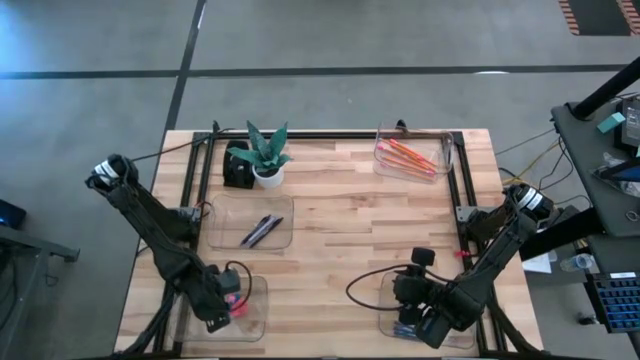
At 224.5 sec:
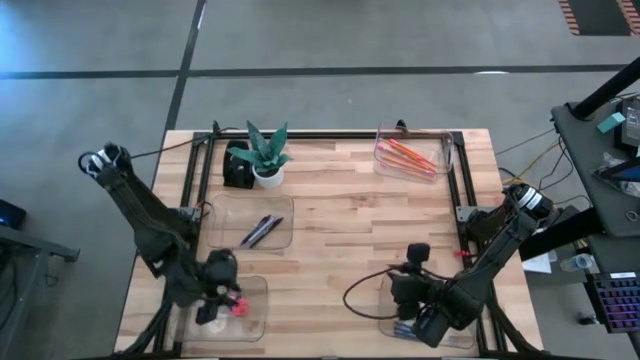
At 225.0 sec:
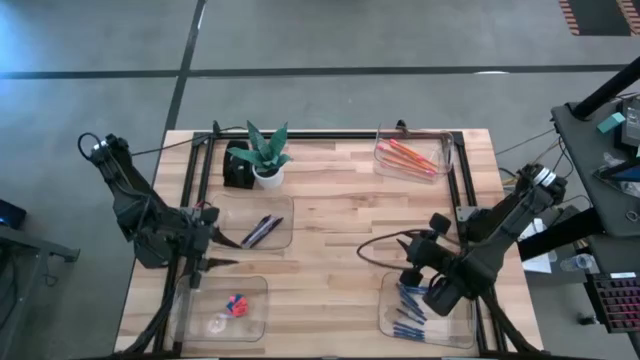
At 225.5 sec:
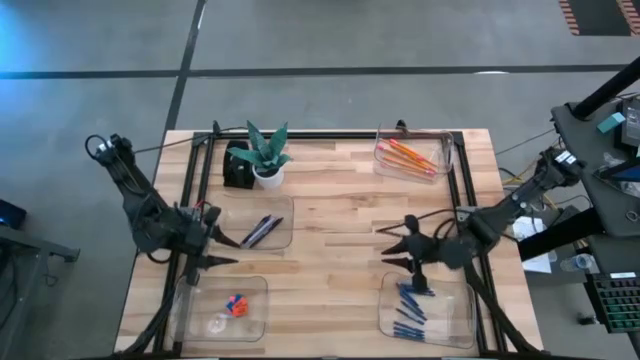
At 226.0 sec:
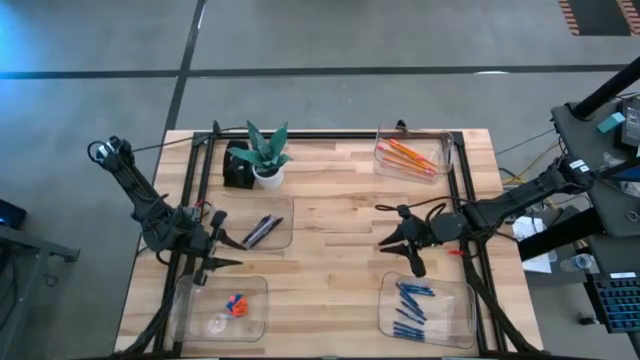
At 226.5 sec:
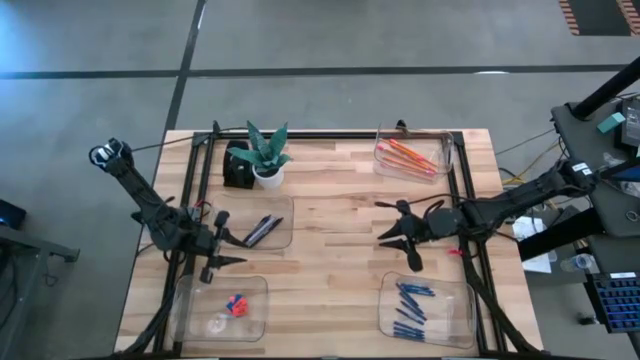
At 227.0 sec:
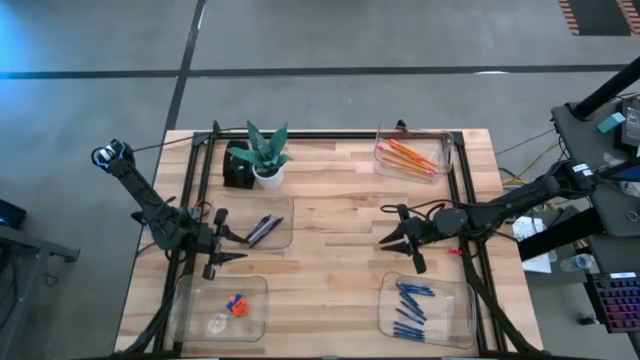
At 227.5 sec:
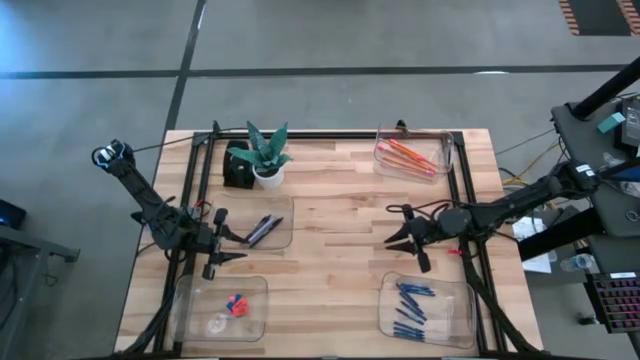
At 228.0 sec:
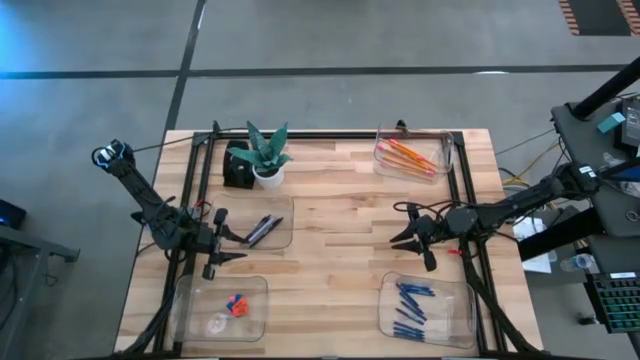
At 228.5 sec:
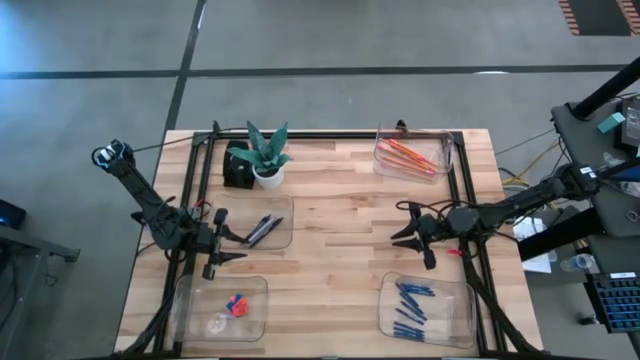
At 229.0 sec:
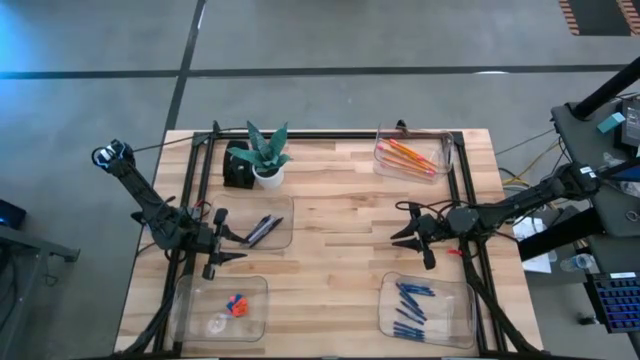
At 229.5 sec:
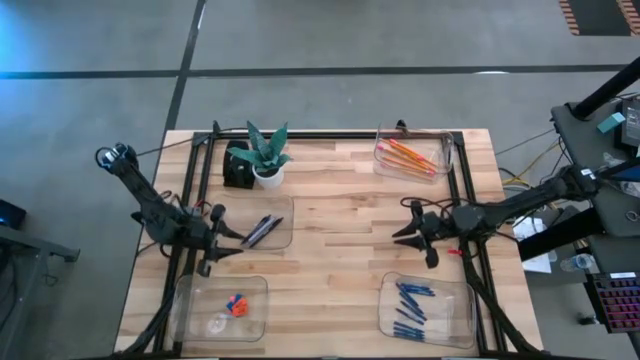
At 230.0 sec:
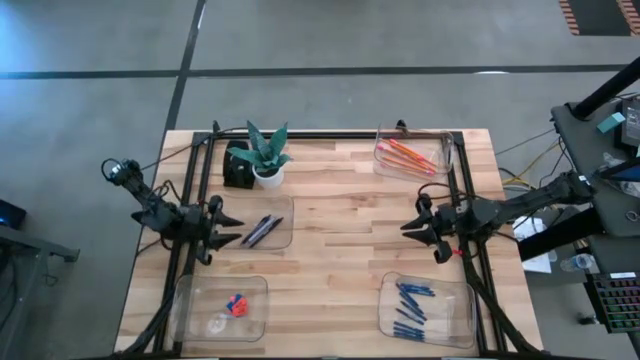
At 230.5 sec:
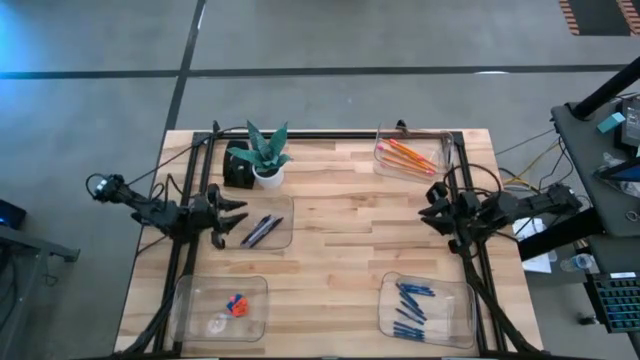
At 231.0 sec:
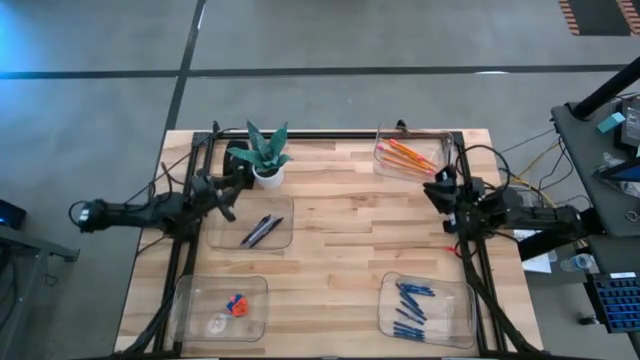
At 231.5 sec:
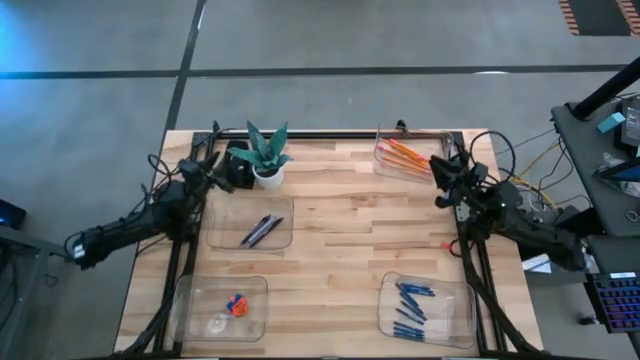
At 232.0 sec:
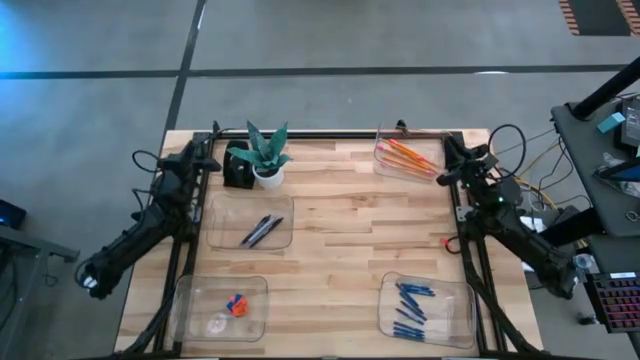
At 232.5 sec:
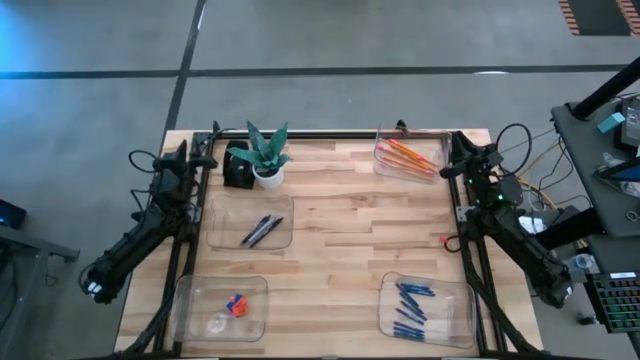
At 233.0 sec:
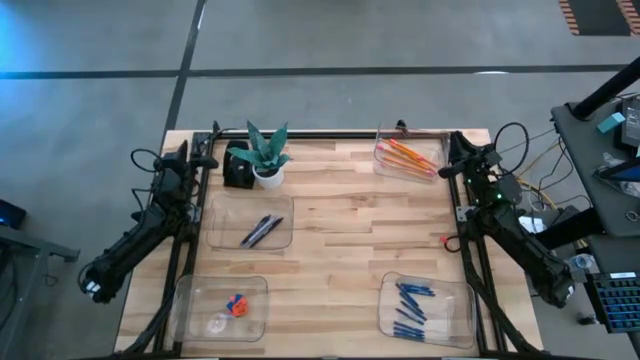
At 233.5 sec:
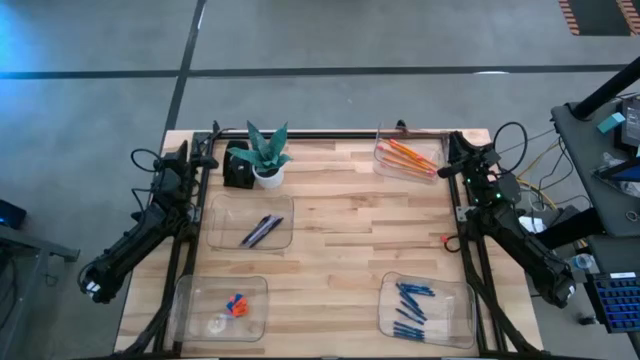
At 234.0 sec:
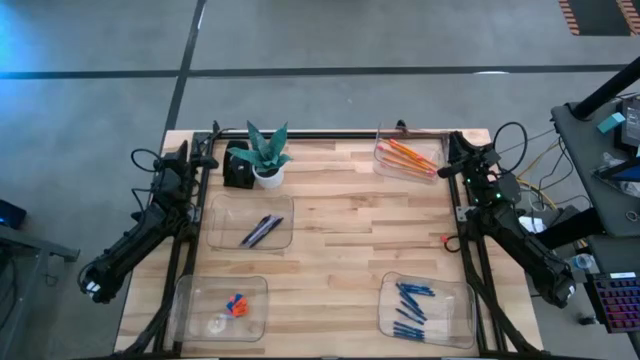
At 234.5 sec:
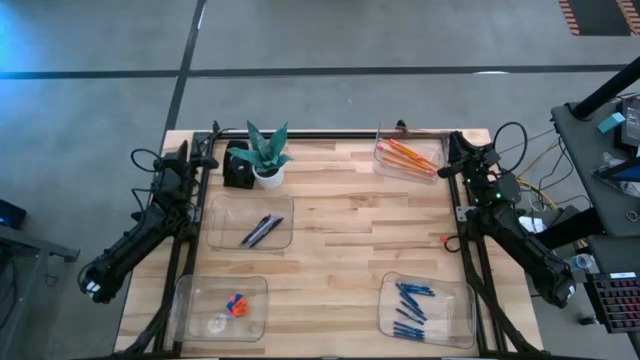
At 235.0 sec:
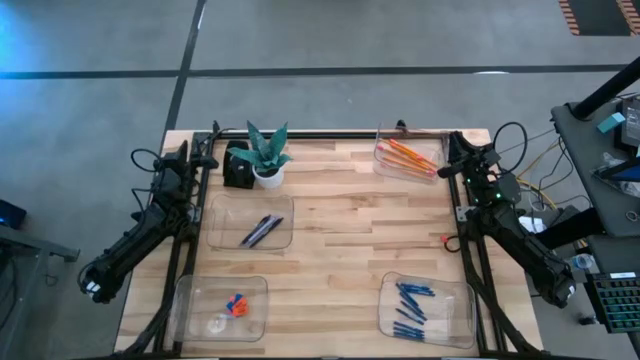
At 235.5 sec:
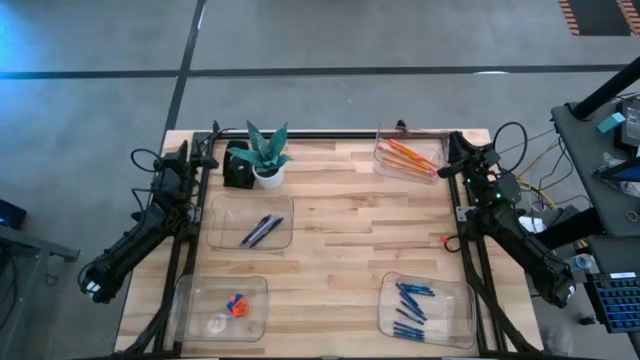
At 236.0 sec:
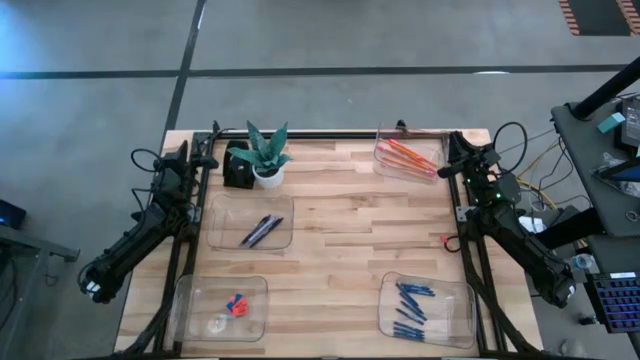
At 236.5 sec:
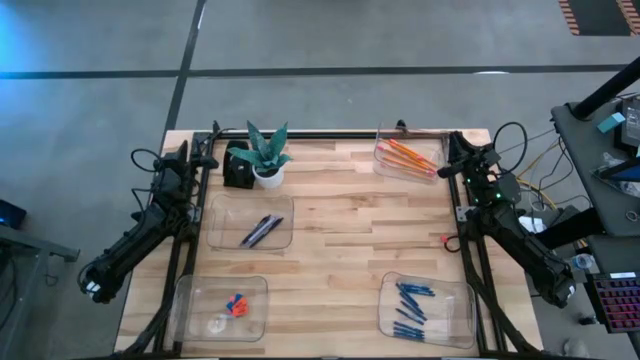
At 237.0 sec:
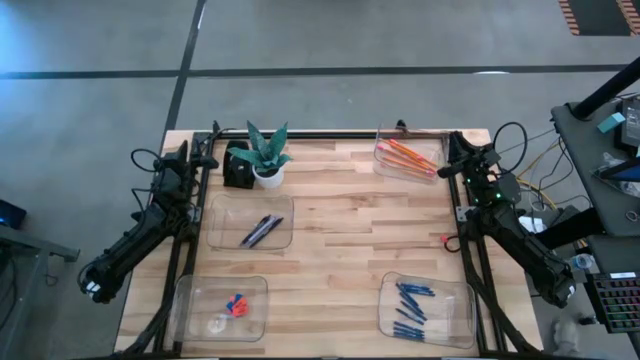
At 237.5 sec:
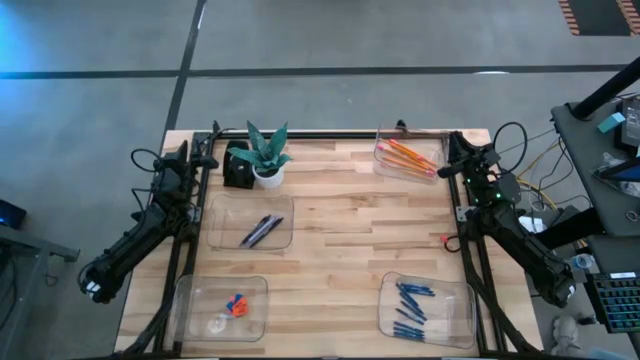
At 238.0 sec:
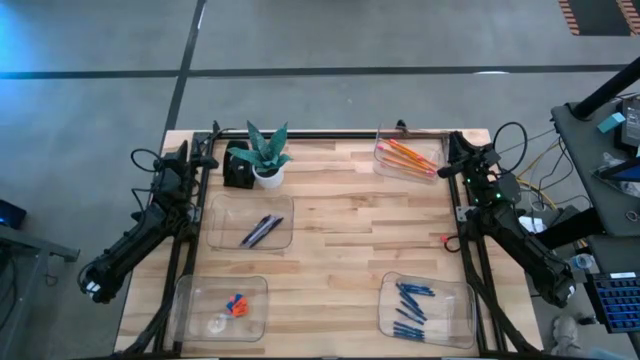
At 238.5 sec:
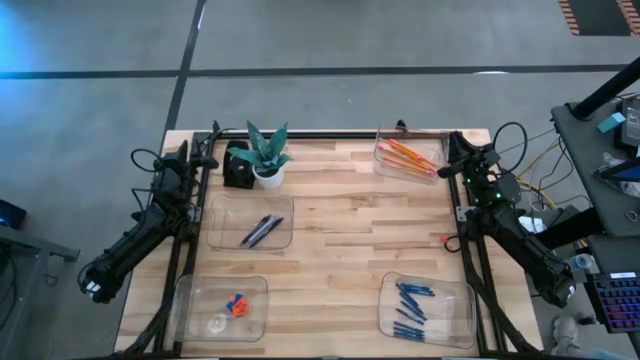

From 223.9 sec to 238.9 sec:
Task: Sort crayons/erasers/pens/pencils in bins
Return to Home Position

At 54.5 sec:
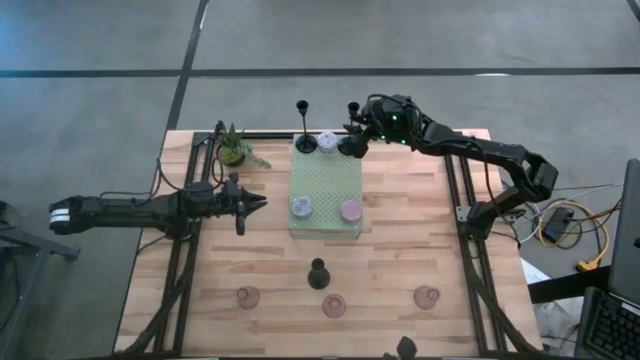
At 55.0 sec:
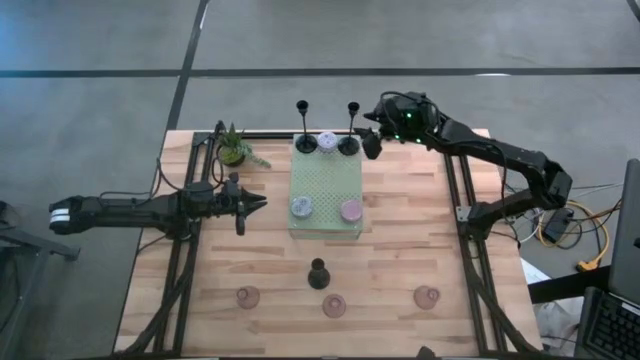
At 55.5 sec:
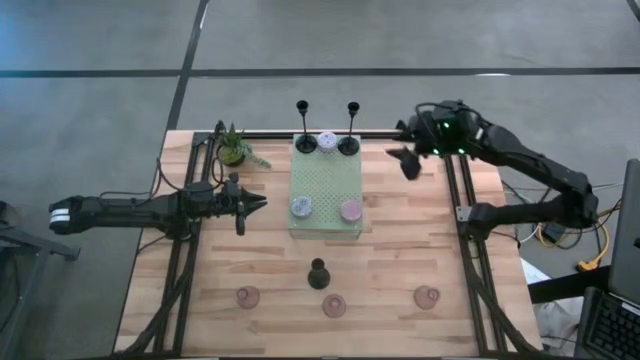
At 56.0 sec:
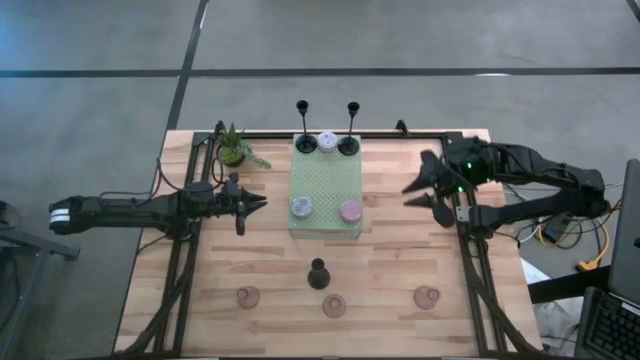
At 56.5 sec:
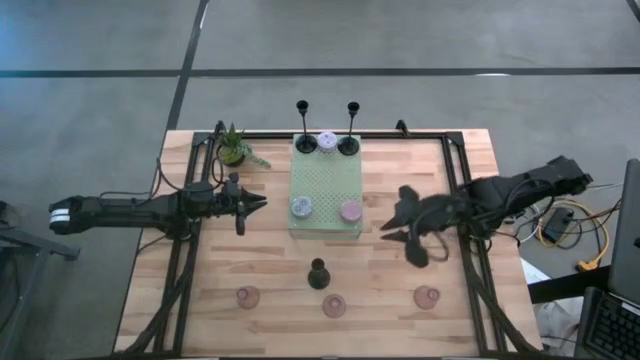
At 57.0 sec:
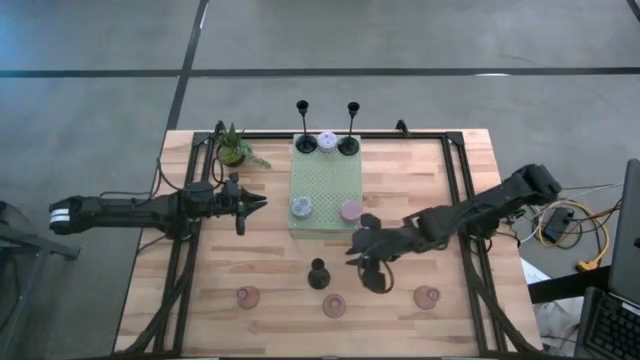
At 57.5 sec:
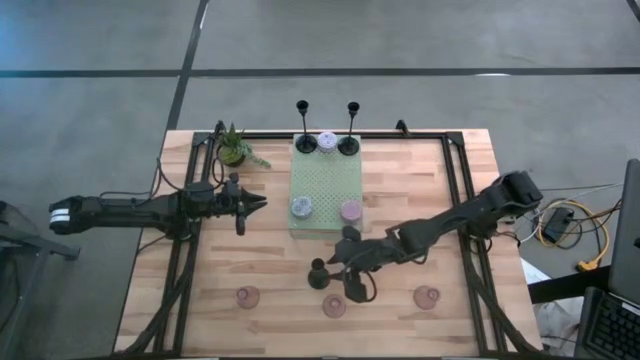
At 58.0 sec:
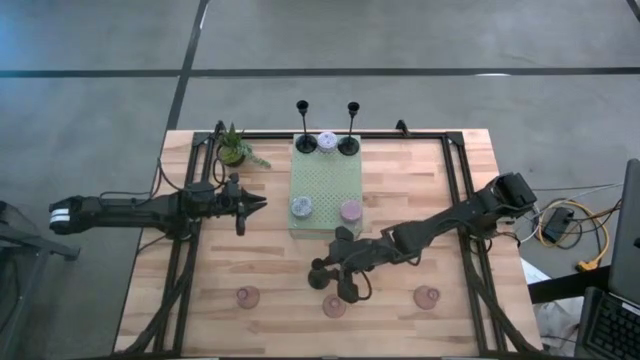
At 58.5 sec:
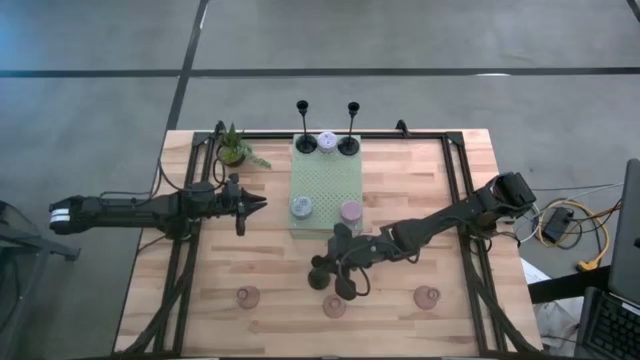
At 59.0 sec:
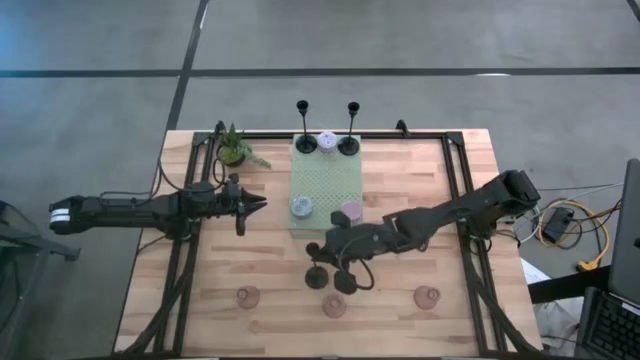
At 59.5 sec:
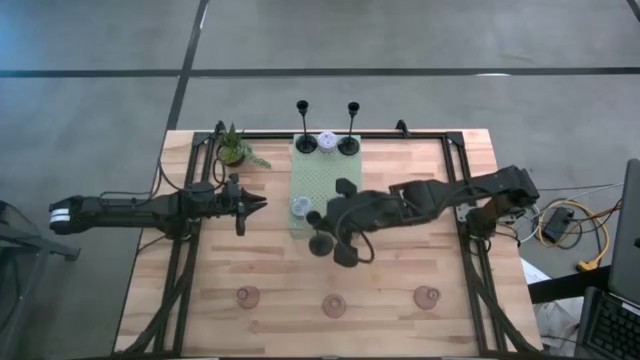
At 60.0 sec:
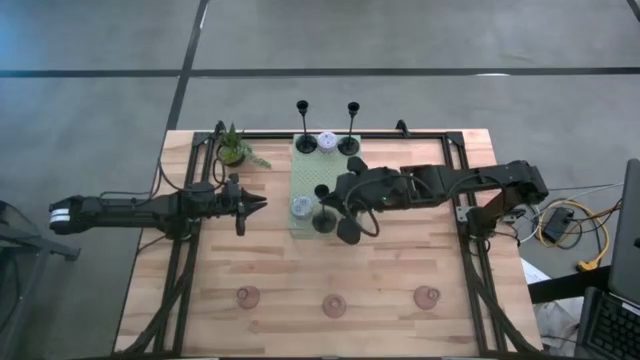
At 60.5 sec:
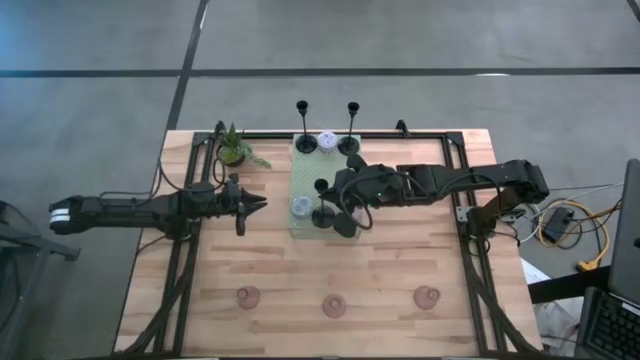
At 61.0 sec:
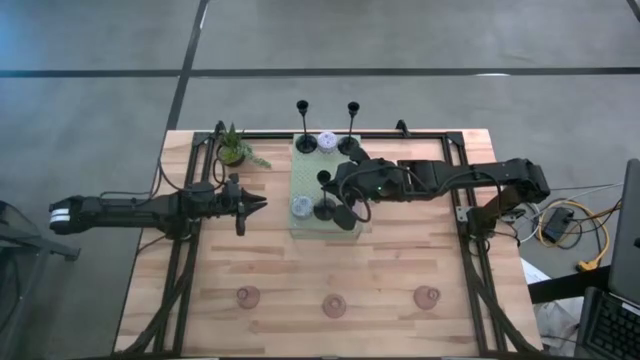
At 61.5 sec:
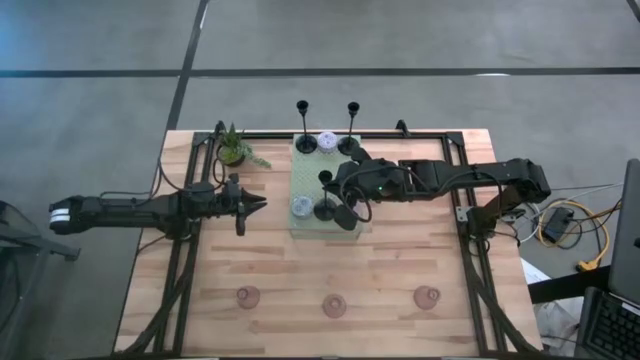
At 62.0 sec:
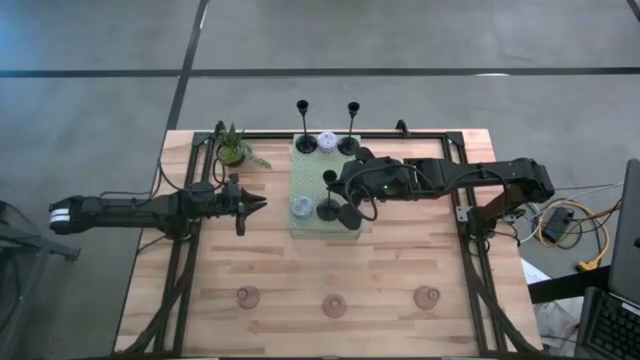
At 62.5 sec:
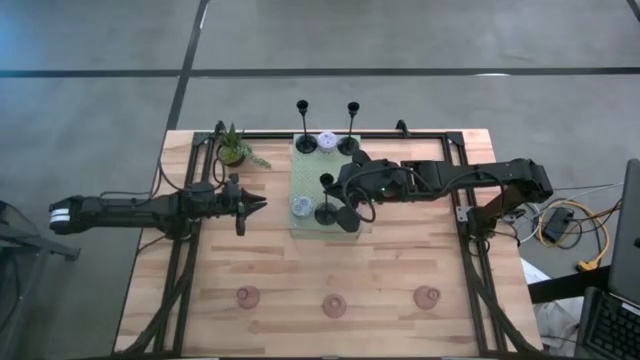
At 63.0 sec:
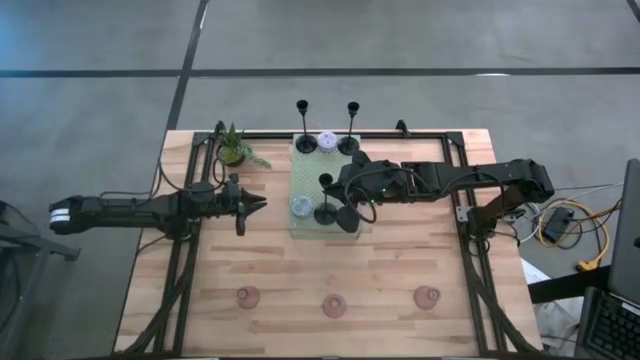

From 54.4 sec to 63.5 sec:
Task: Pick & Place candle stick holders
Put the black candle holder on the shelf
